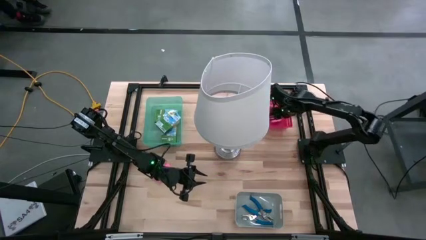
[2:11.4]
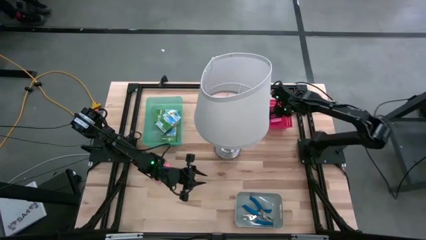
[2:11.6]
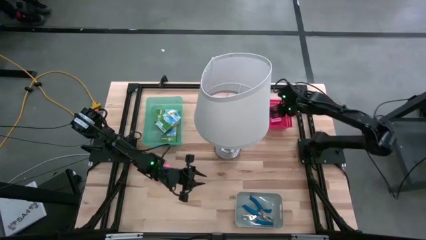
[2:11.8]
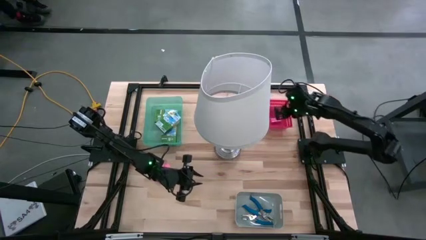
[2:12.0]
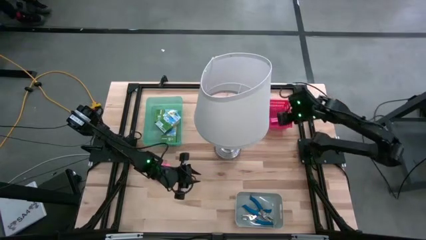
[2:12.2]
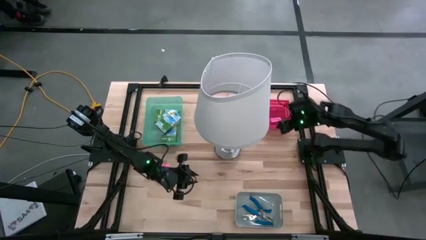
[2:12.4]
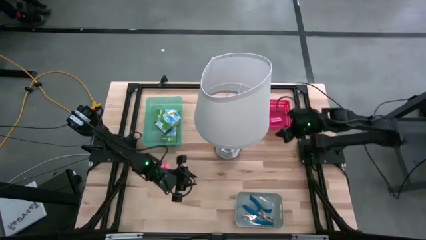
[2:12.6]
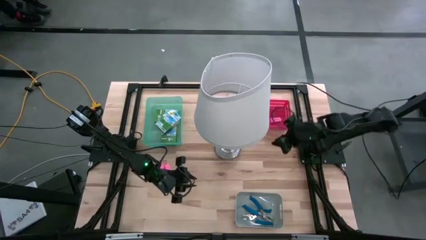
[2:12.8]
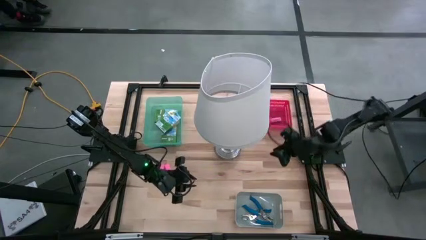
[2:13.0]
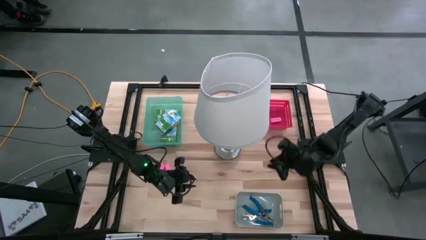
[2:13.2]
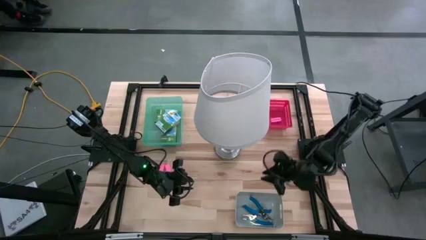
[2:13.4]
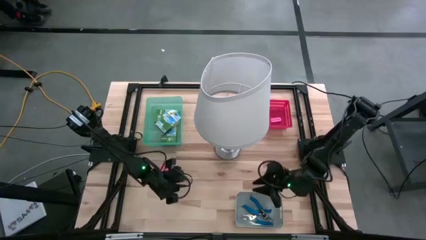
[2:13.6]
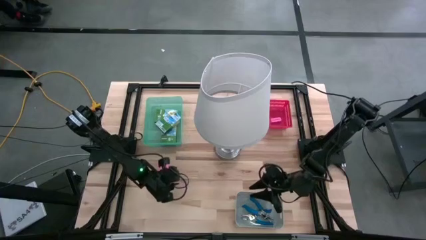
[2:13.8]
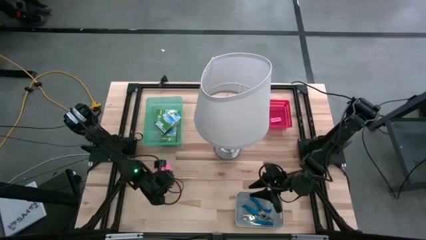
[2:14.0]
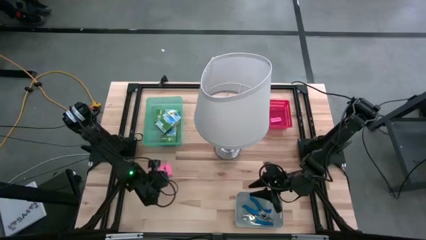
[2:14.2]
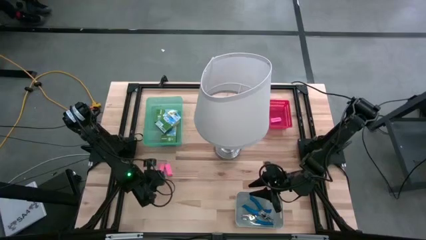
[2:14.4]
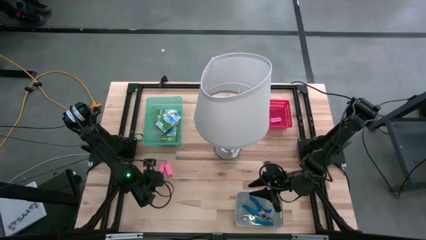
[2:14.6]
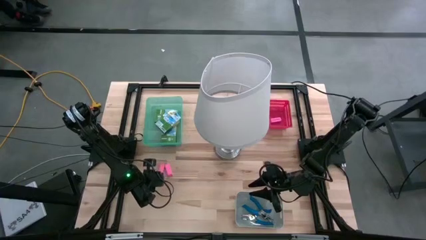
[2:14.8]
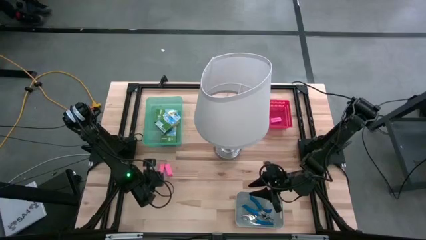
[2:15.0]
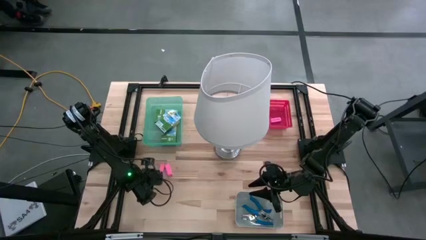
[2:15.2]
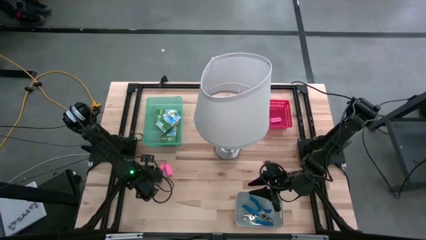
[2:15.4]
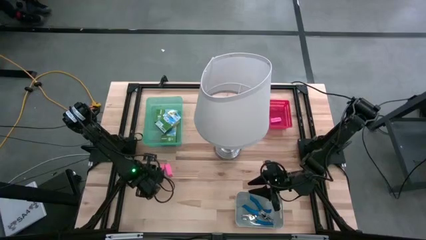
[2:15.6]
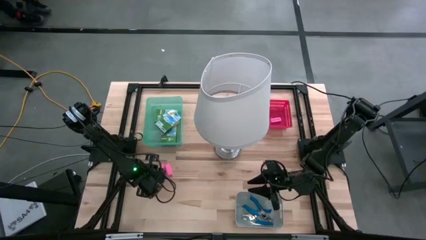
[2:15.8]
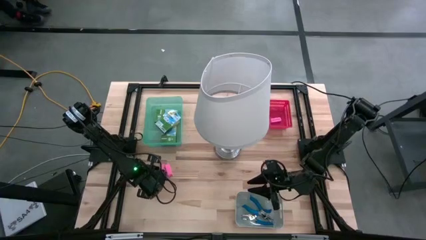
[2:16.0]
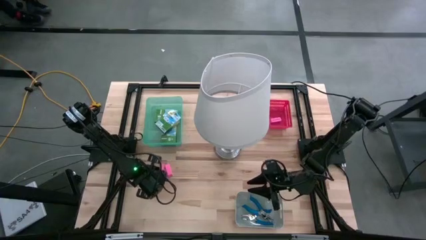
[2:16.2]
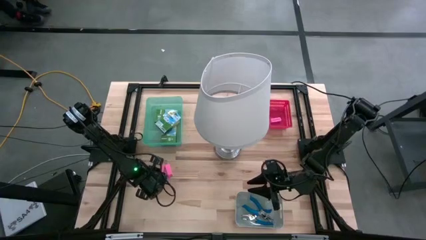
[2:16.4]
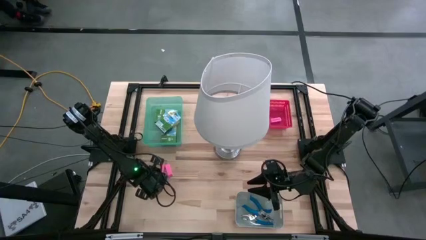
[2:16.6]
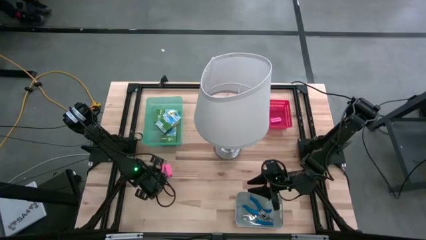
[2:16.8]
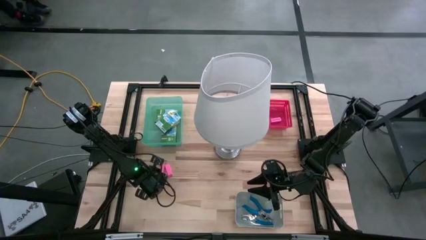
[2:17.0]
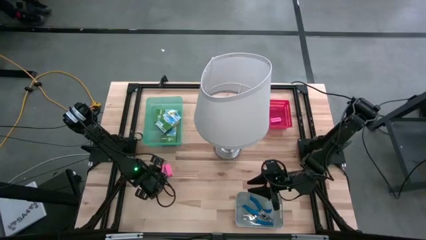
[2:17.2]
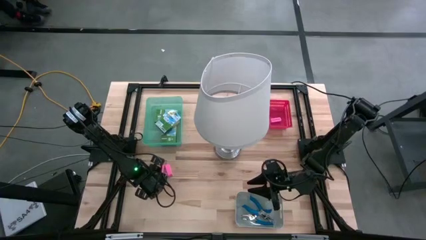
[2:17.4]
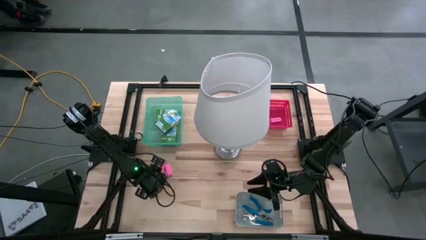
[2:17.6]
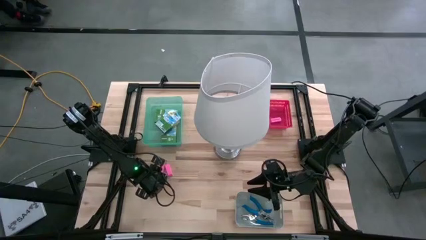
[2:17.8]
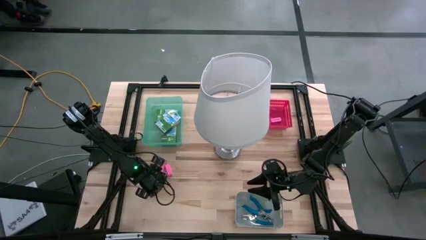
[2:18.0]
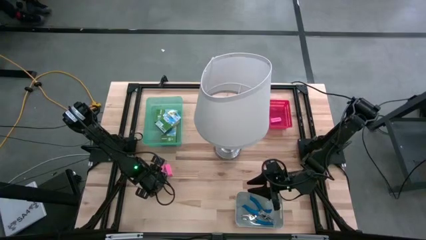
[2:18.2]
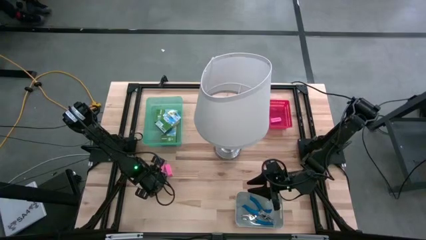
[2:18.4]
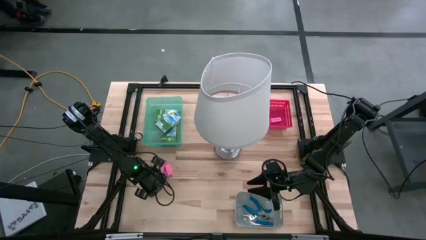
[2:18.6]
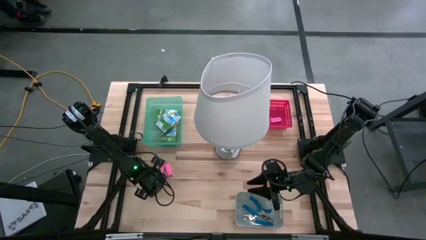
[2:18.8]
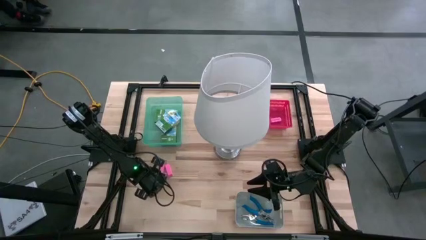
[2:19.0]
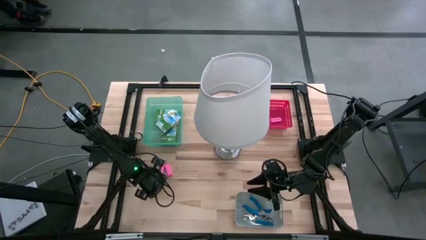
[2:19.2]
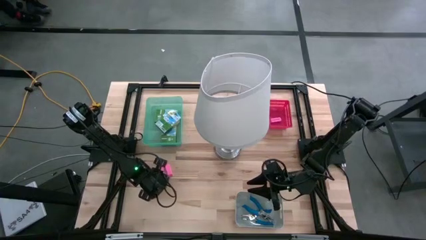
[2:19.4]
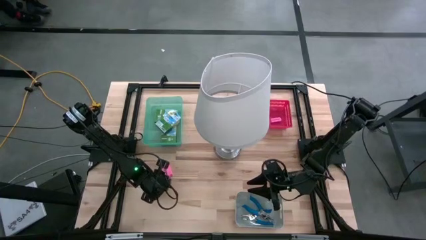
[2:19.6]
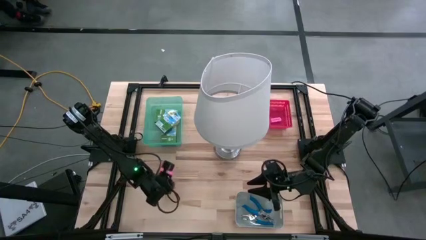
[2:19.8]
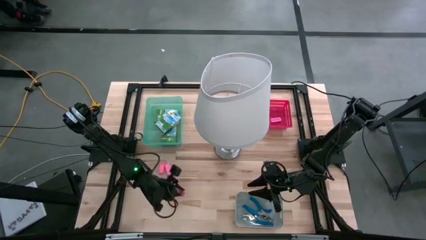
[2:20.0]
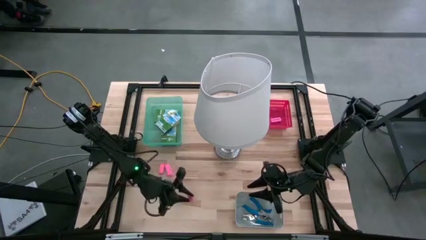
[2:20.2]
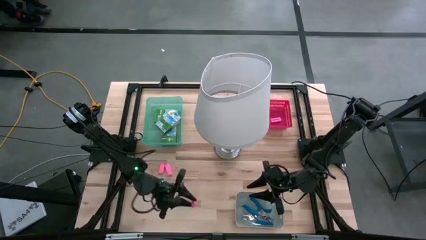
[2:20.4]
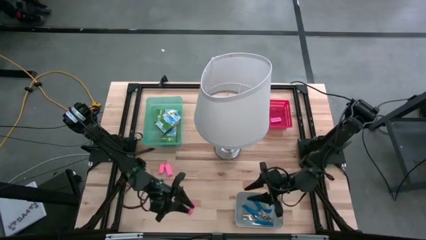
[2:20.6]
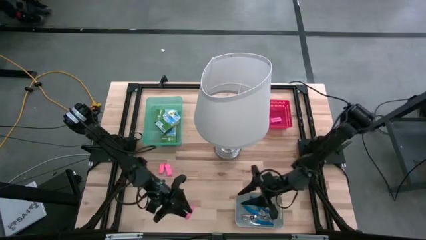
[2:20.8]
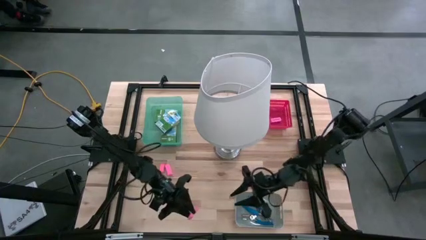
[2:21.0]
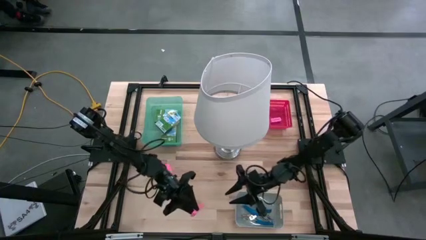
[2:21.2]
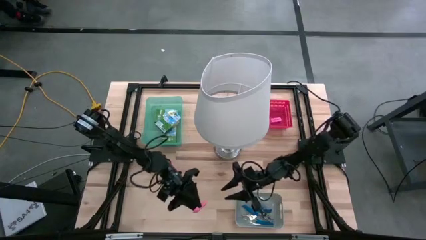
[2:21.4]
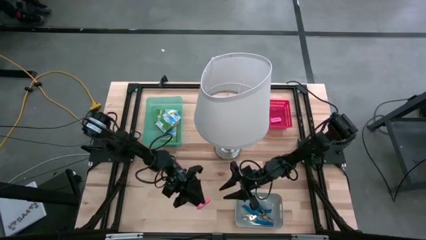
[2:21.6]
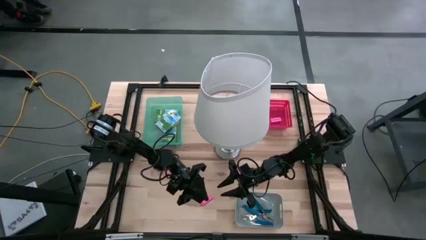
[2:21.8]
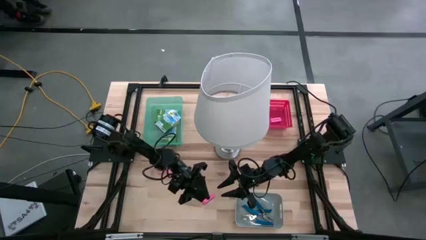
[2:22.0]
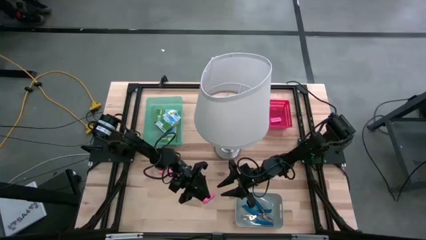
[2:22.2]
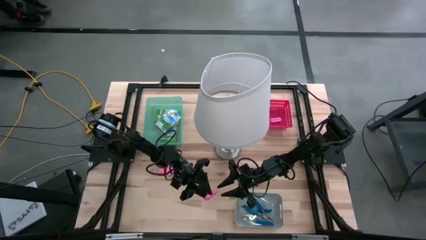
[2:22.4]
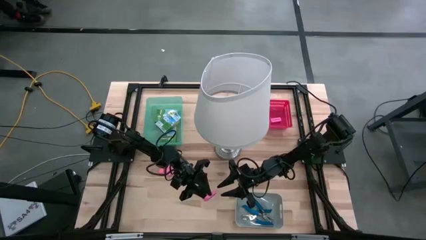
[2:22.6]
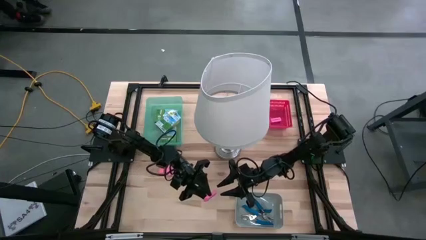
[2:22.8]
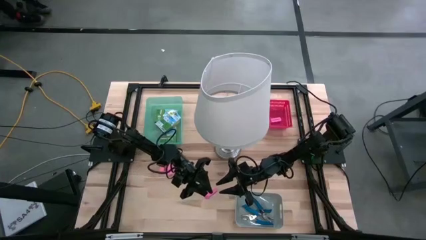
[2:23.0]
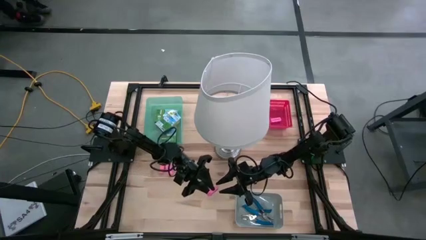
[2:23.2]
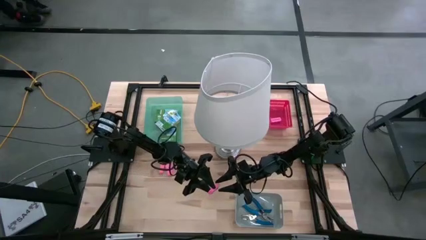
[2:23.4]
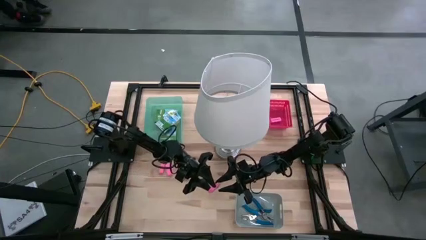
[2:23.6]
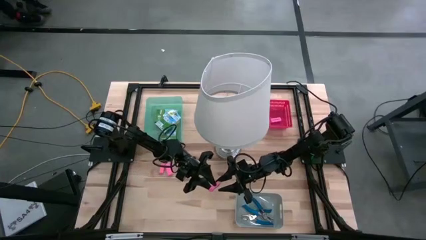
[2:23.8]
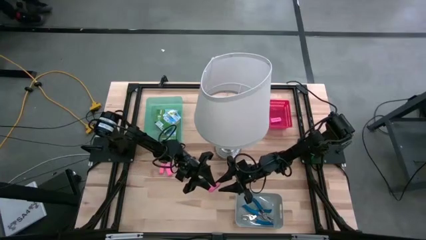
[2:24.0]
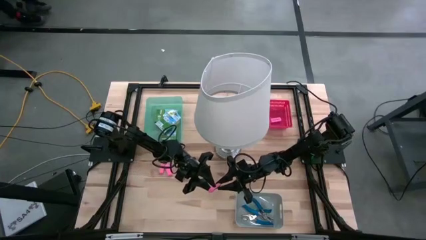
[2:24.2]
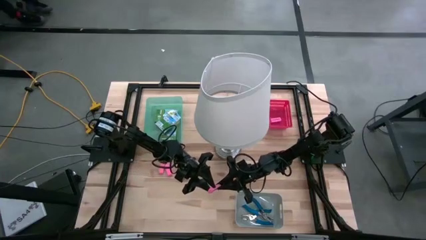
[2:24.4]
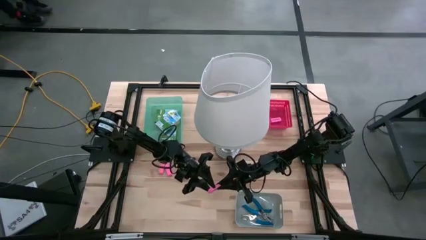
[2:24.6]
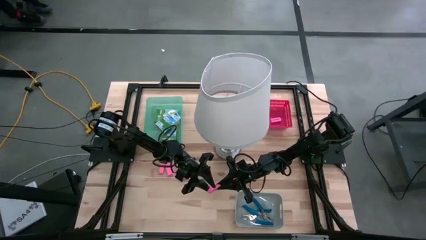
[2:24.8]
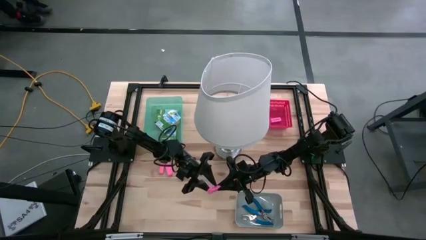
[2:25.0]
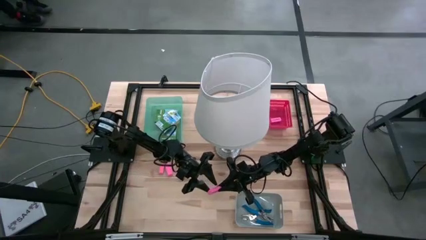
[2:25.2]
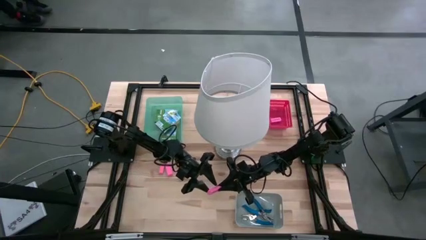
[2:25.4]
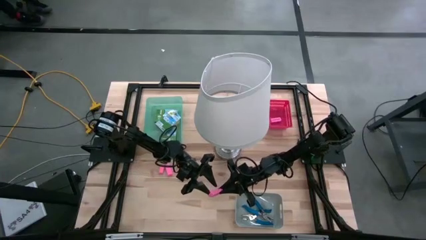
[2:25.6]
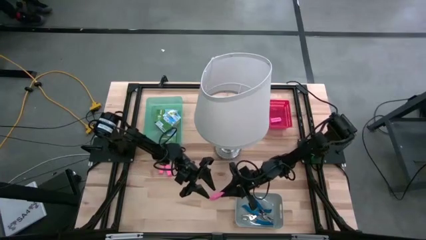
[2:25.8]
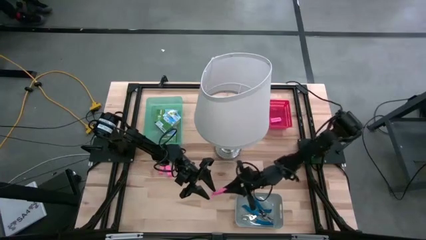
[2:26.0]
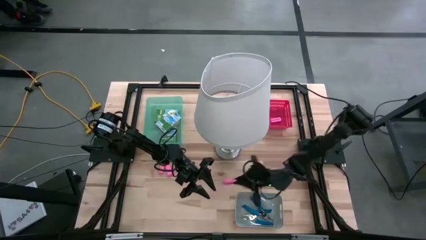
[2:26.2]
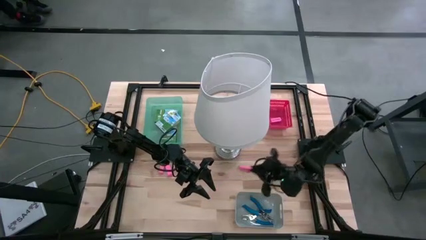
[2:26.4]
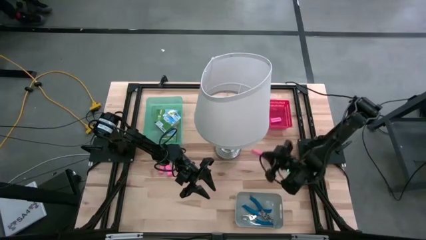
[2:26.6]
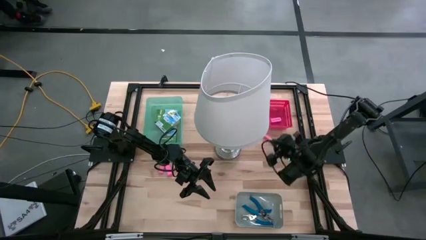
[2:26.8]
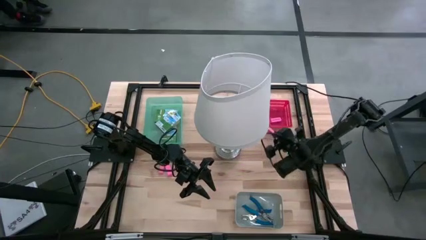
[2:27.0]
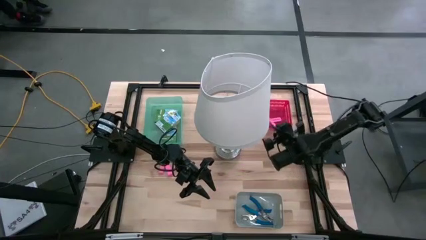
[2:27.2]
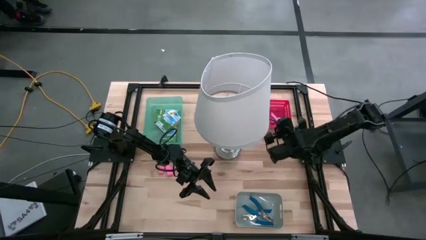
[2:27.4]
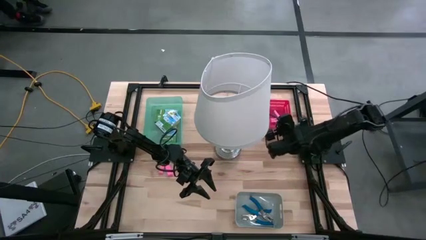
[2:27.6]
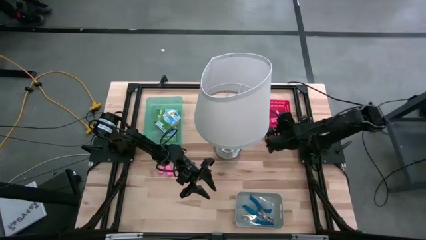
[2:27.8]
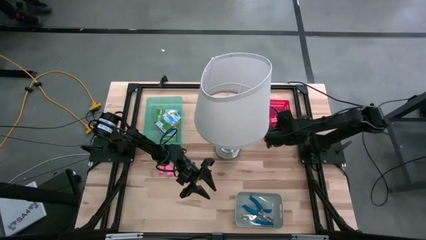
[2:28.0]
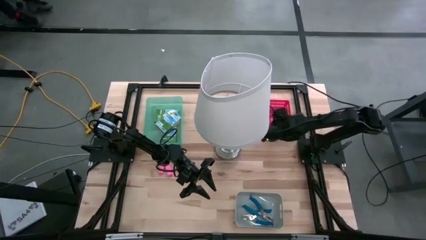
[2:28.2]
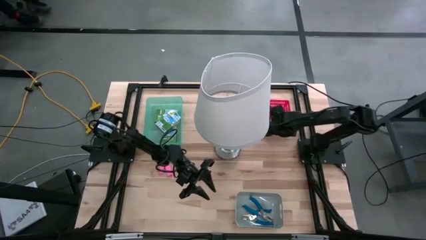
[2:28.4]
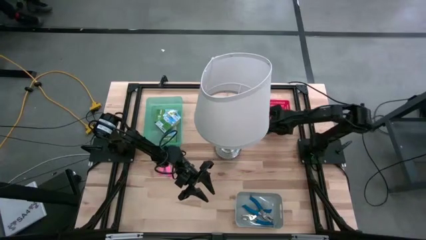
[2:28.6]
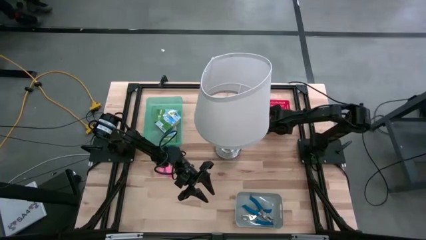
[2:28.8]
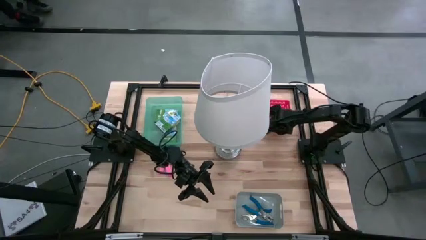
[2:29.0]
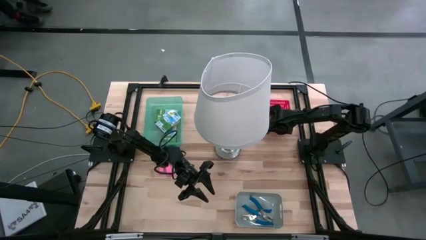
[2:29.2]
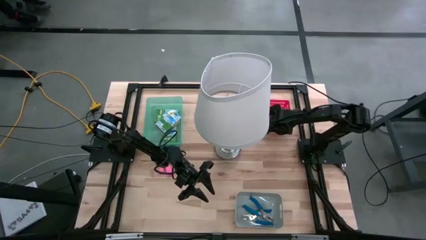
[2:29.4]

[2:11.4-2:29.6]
Task: Pick & Place School Supplies
Put the pink eraser into the red bin
